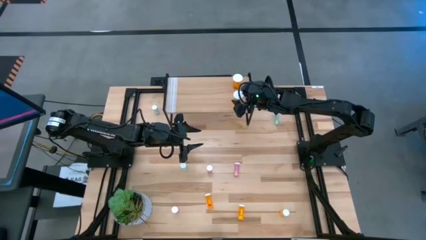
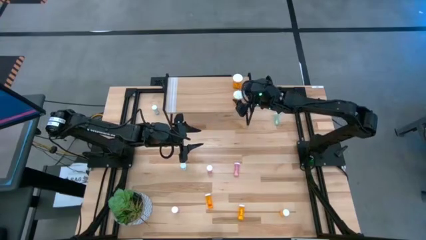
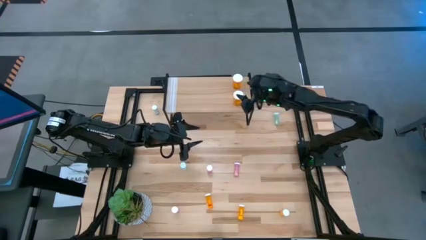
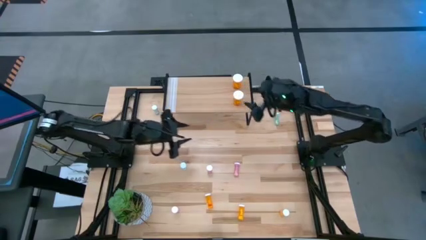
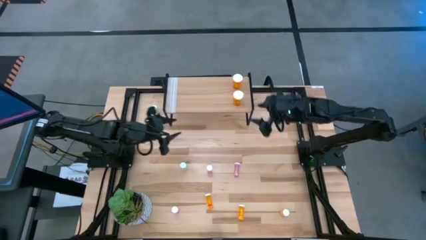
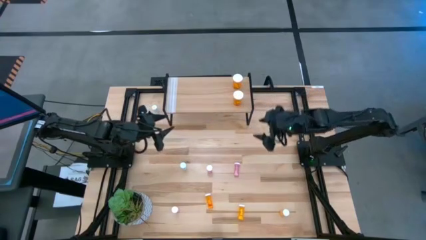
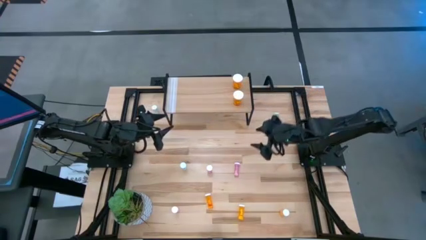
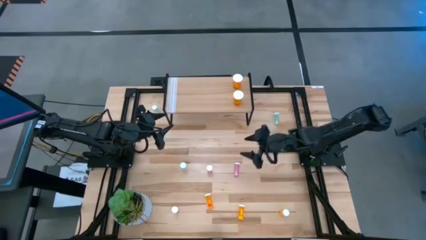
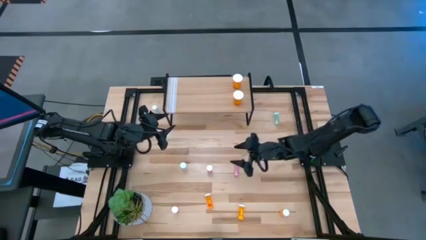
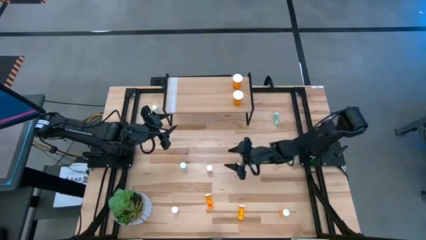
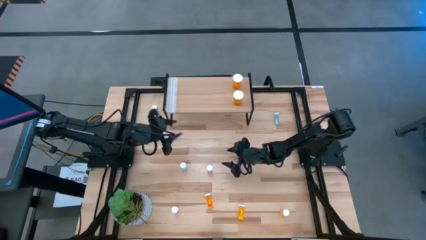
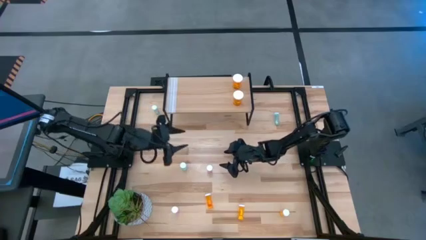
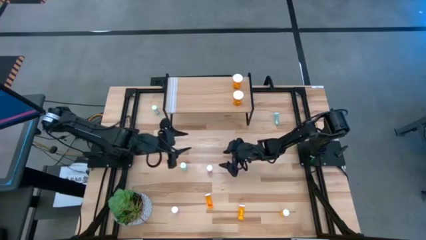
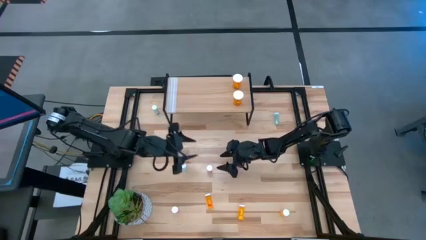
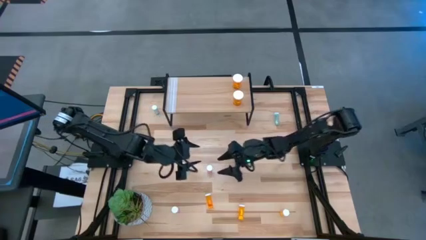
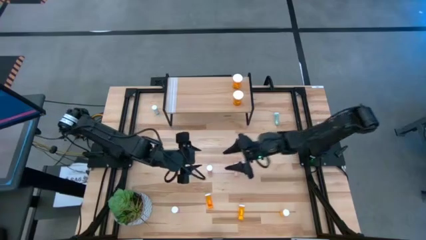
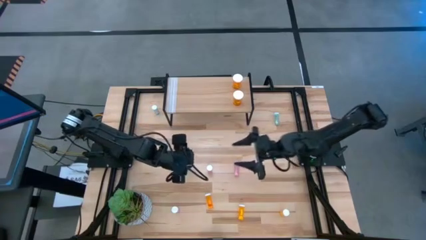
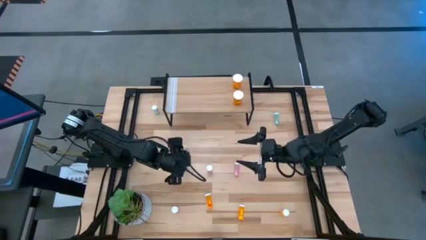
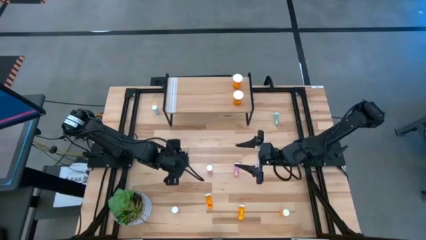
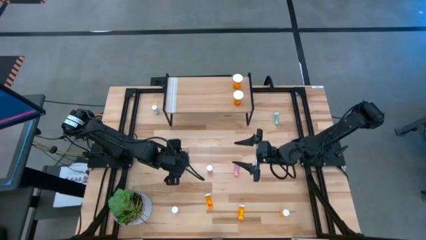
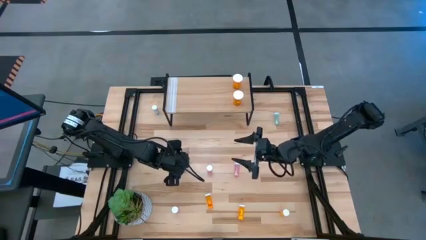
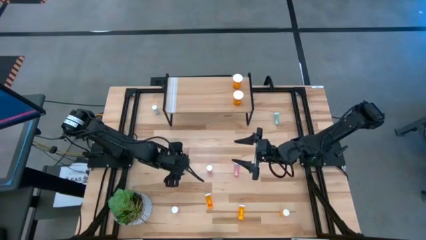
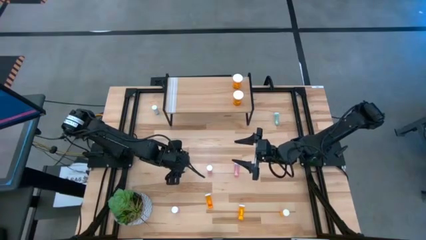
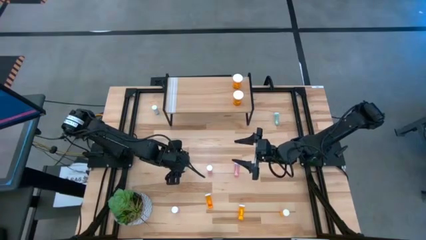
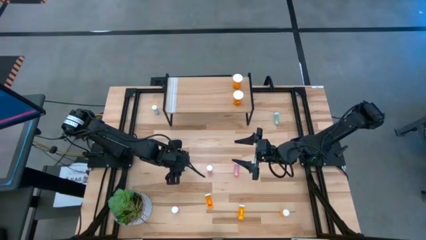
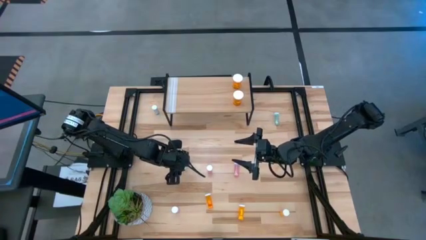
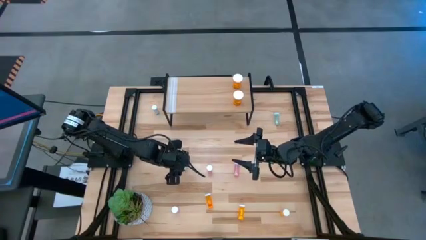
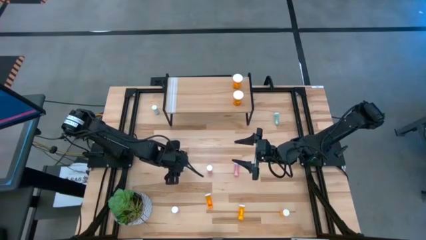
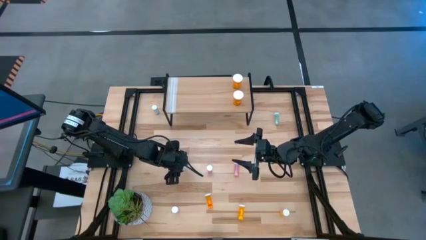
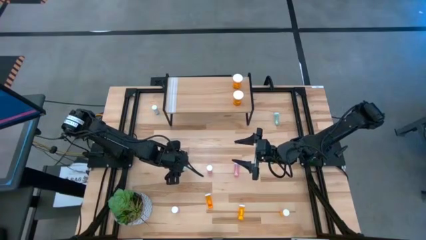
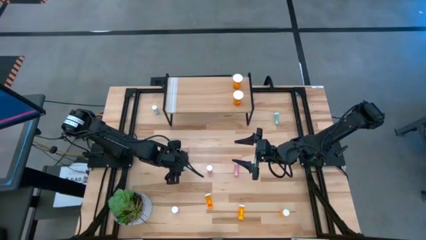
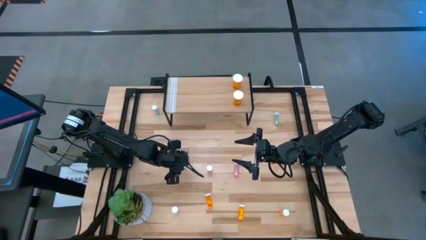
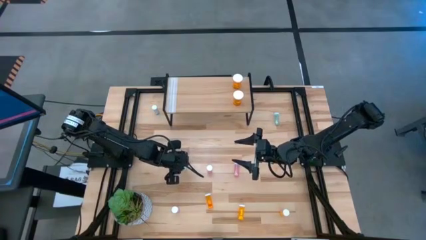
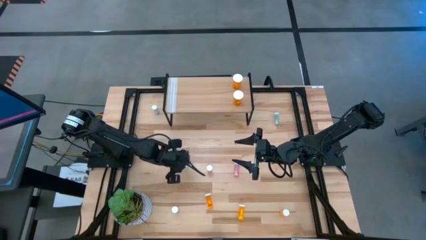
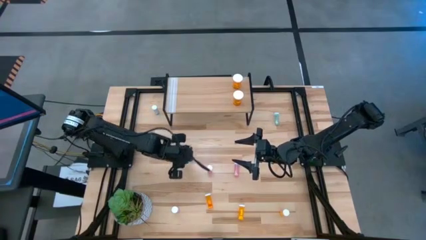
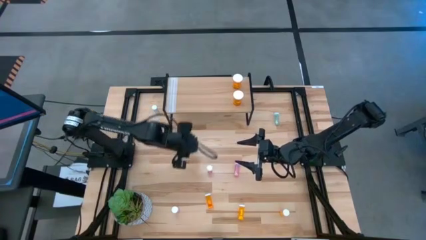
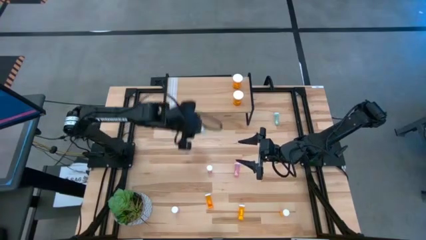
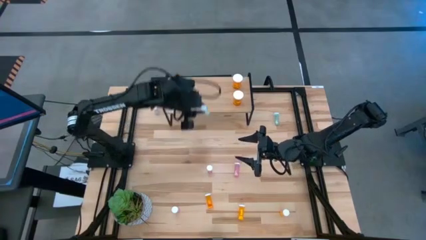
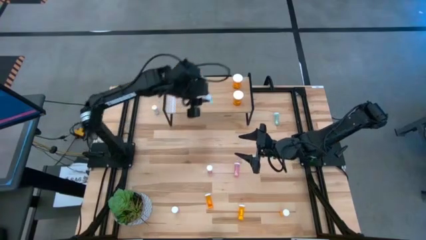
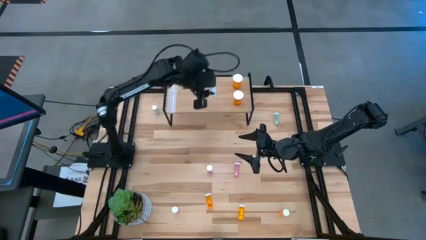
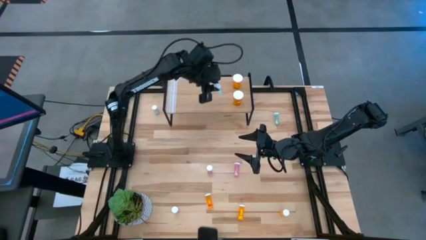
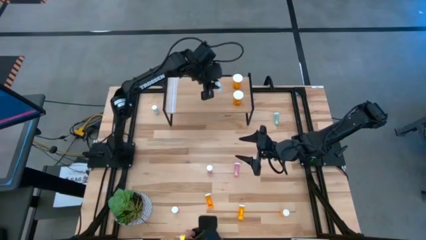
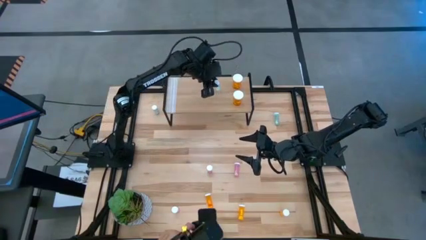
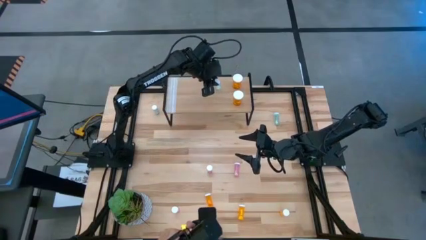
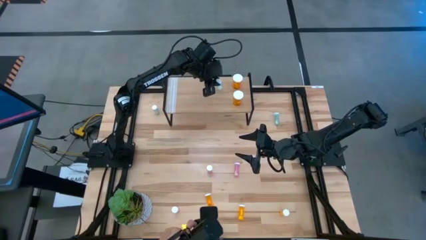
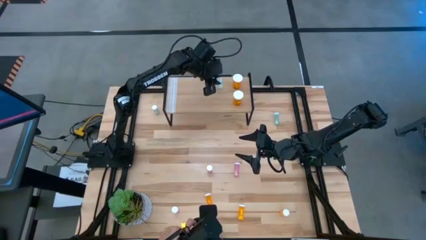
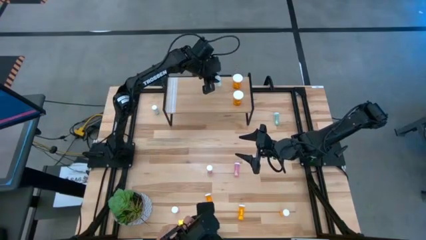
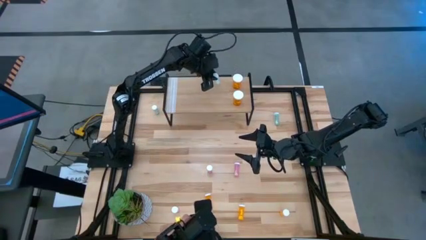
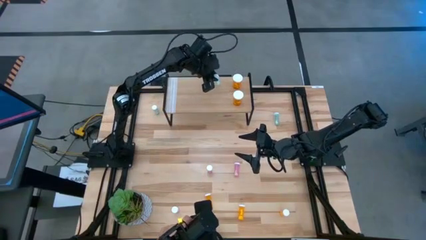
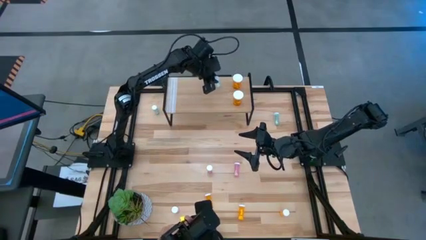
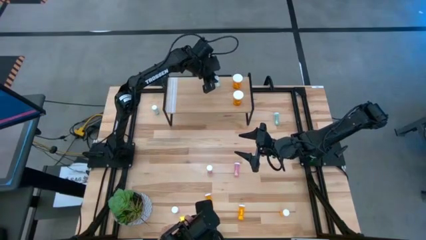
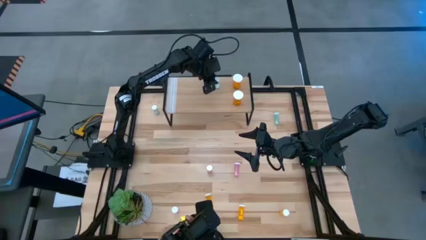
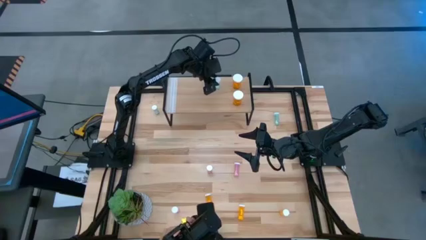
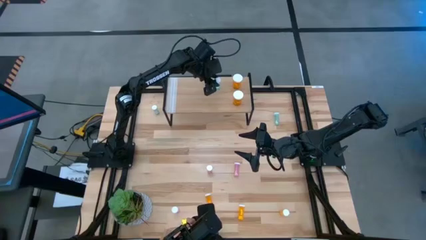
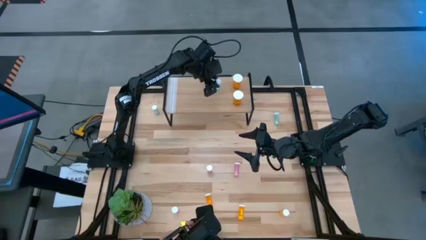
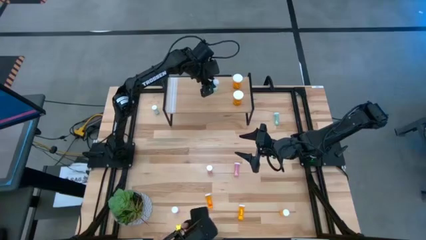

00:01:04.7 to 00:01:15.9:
Task: Pick and place medicine bottles onto shelf by color
Put the bottom middle small blue pill bottle on the shelf

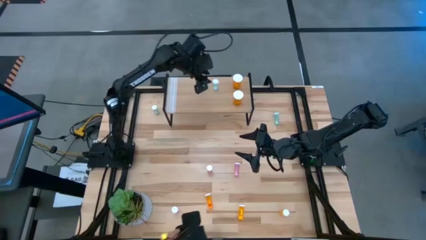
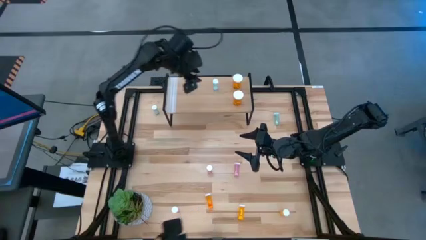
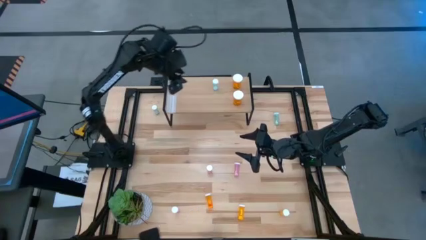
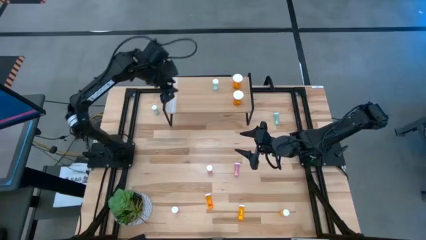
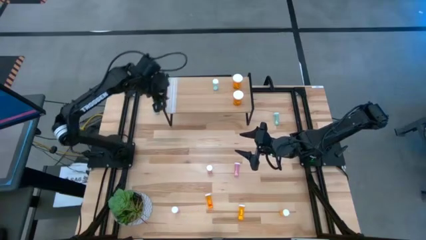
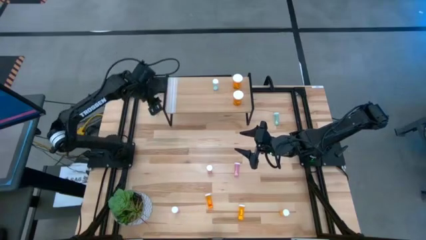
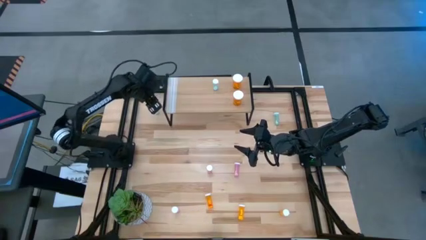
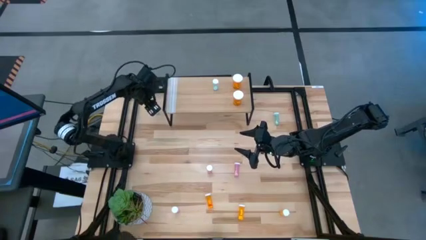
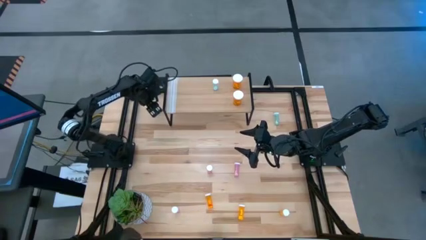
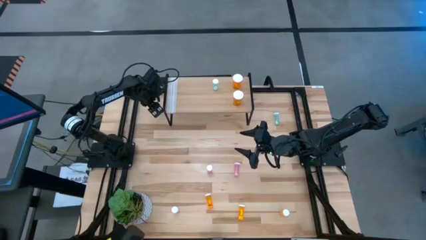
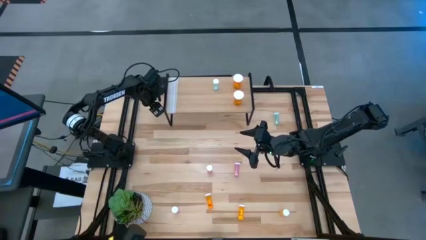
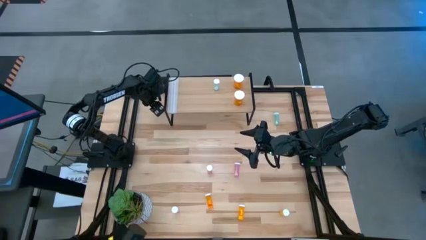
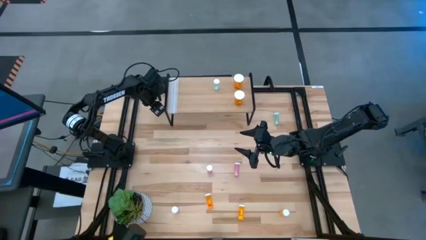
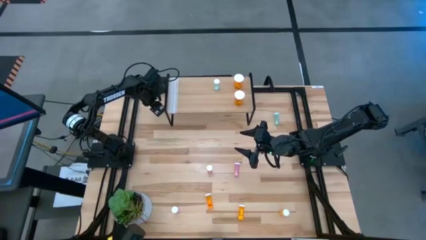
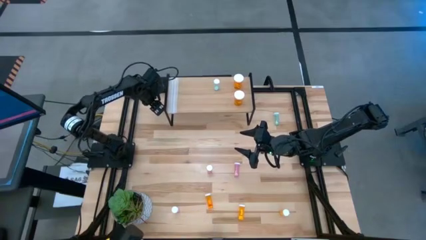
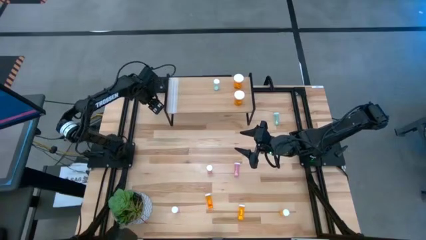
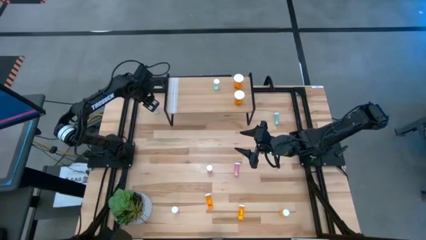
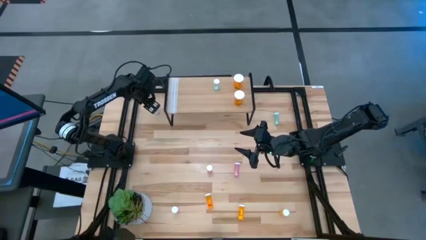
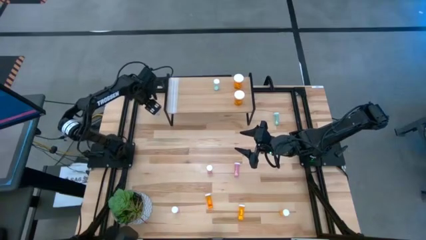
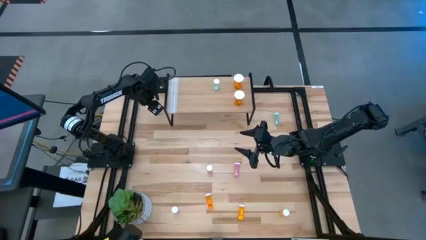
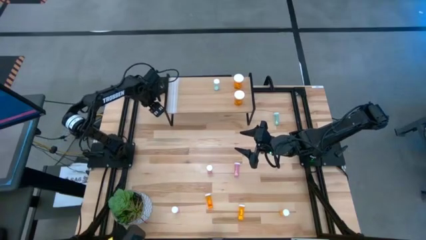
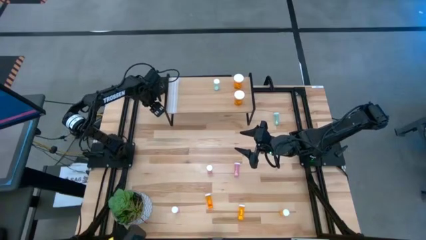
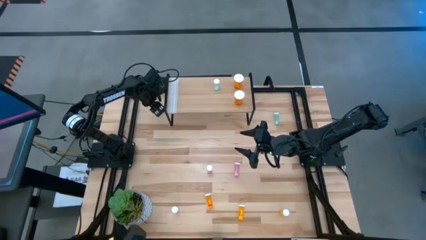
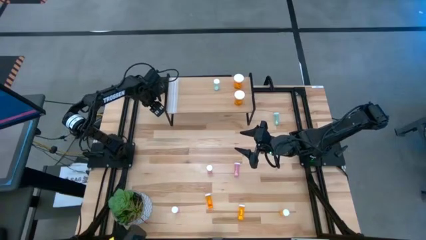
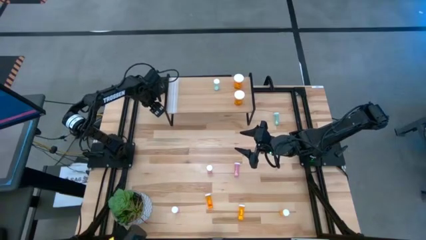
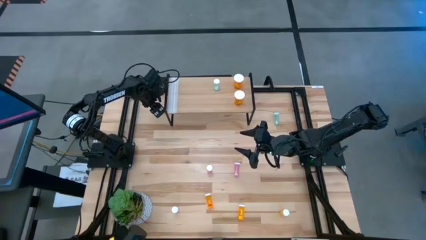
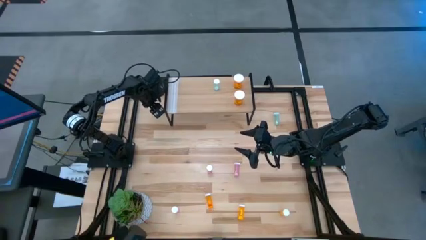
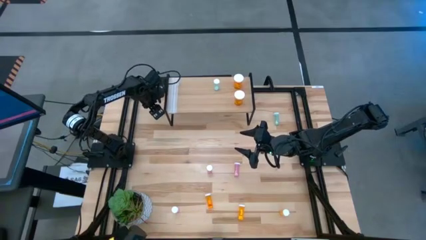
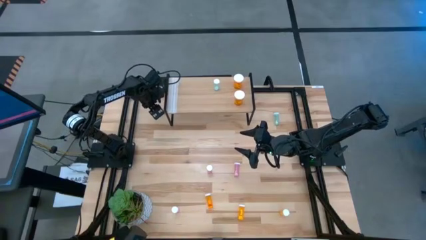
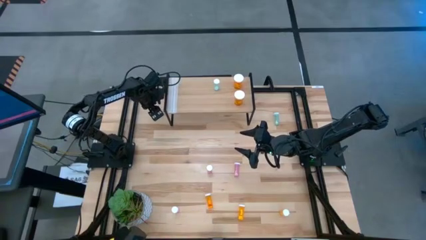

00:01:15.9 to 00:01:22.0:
Put the left small blue pill bottle on the shelf aligned with the other small blue pill bottle
